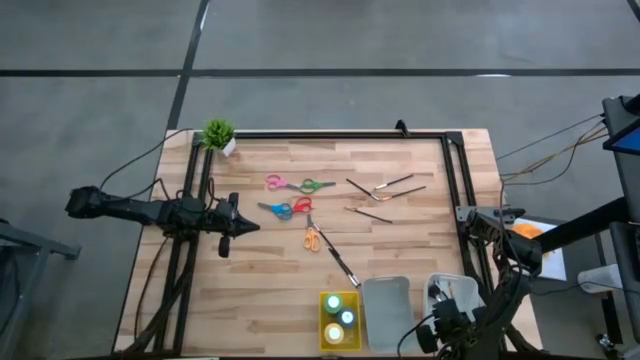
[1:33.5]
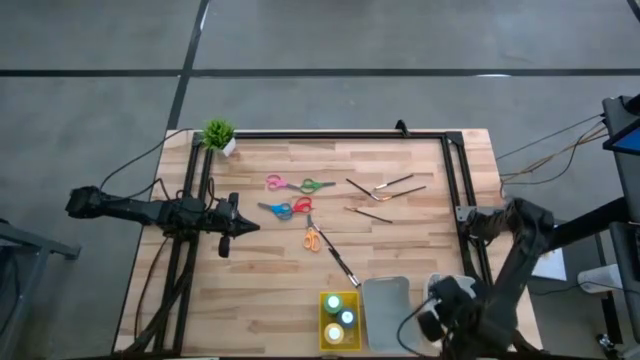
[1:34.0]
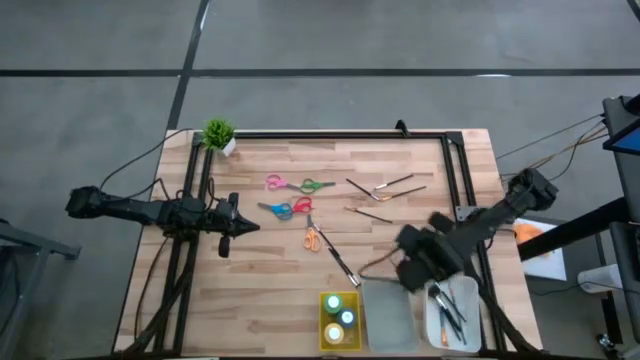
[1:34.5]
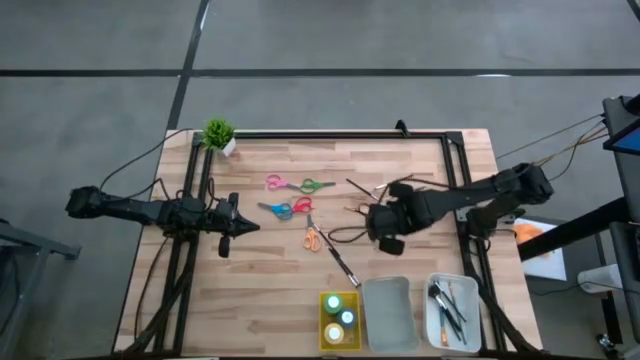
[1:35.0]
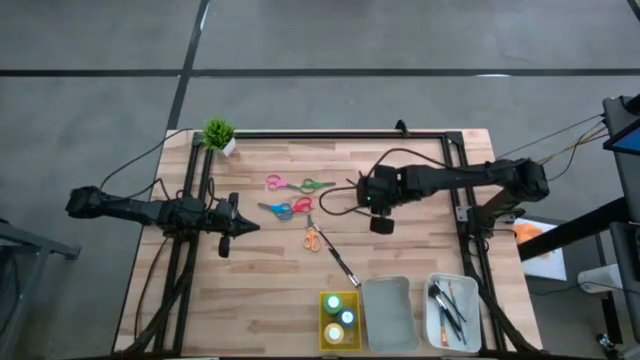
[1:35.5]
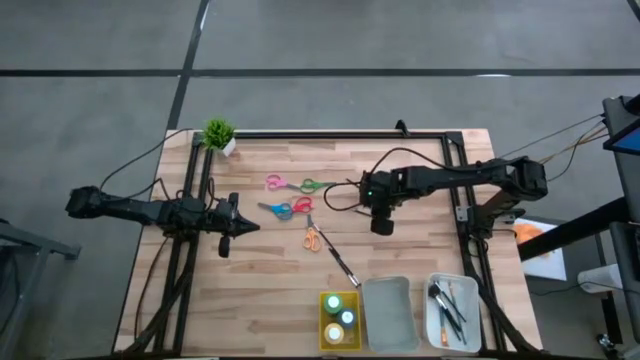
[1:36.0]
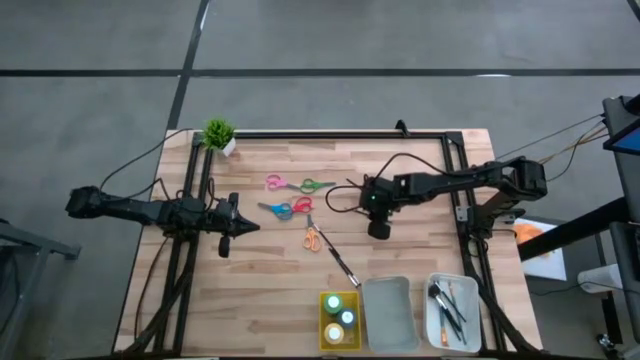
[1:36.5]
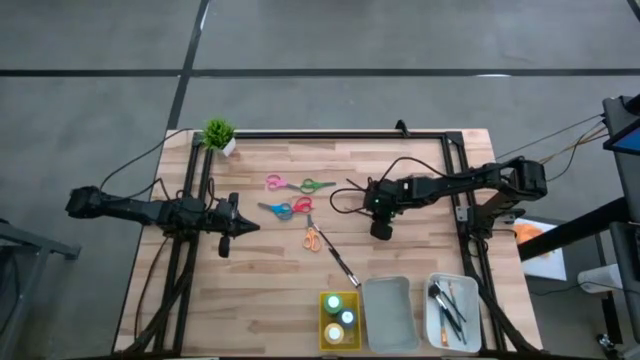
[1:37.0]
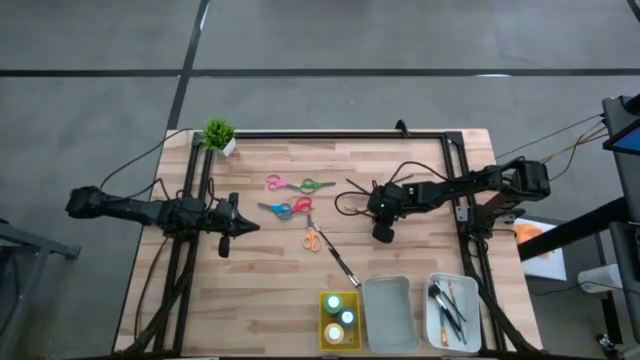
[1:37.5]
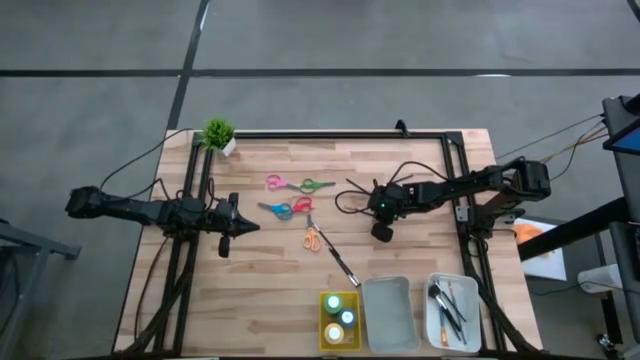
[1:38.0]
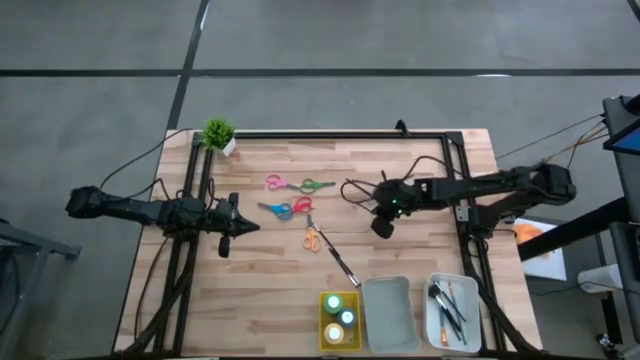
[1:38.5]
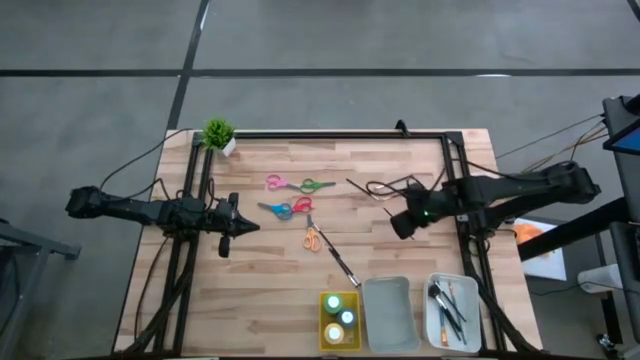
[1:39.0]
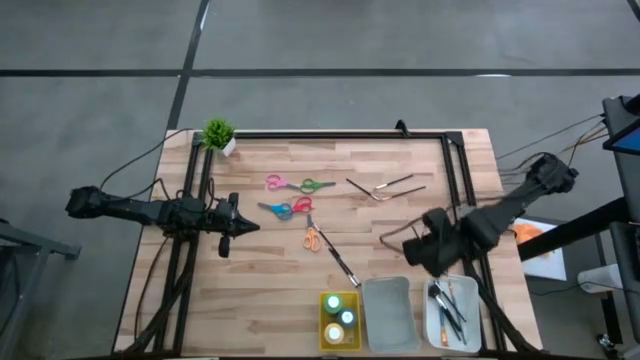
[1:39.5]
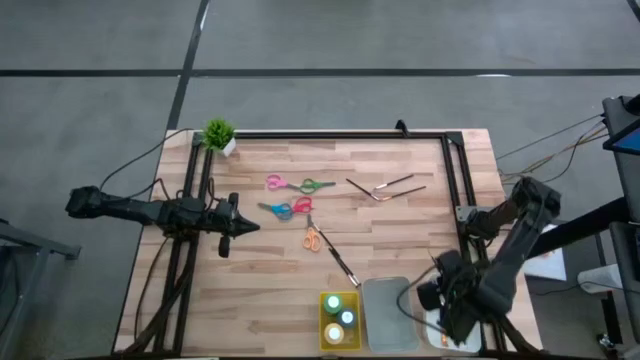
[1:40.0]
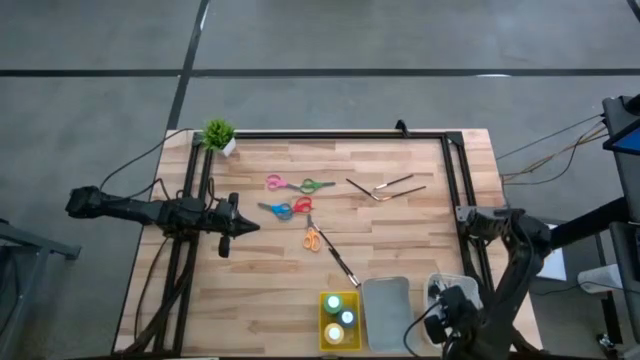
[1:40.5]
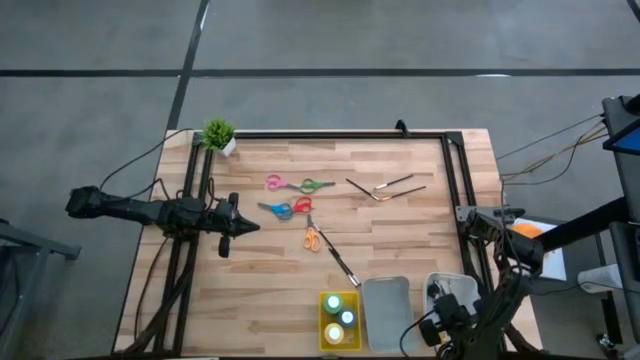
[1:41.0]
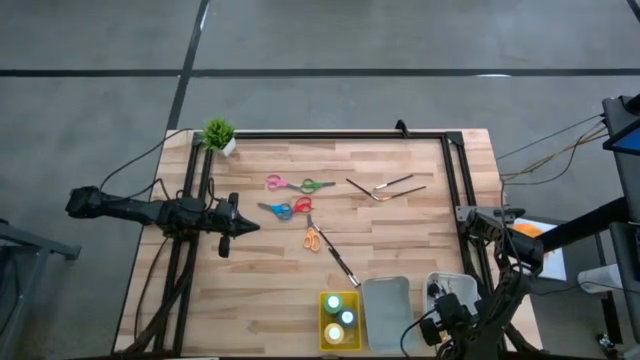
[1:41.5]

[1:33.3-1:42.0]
Task: Pick & Place Paint Supplies
Put the gold paint brush into the white bin

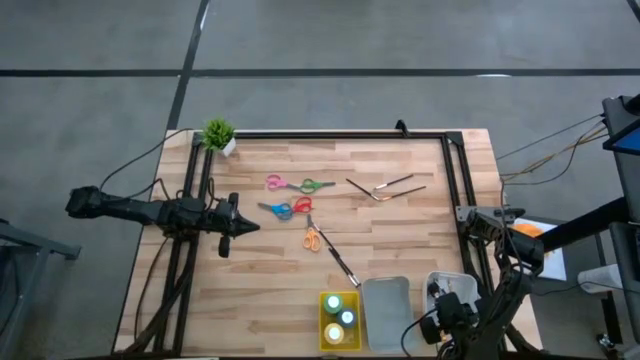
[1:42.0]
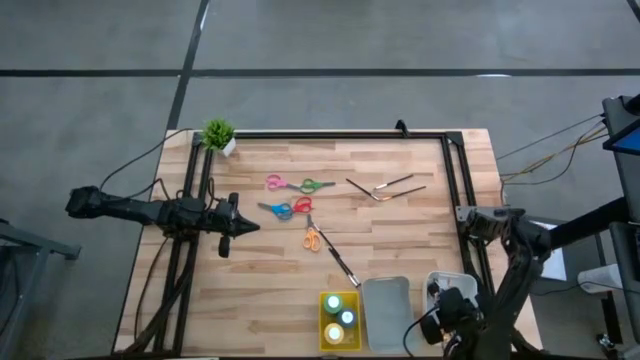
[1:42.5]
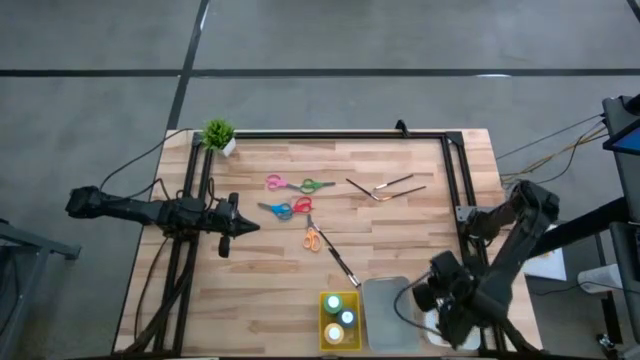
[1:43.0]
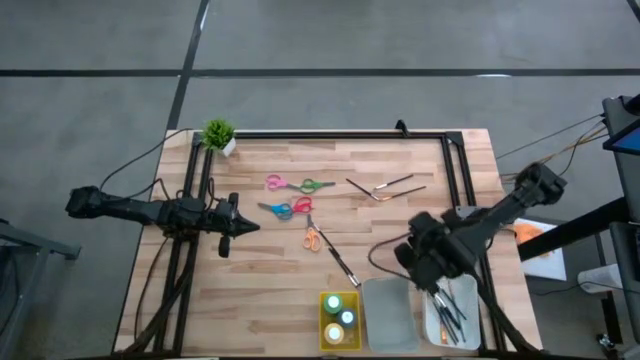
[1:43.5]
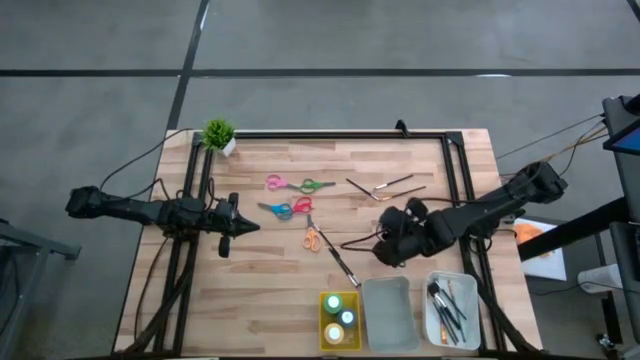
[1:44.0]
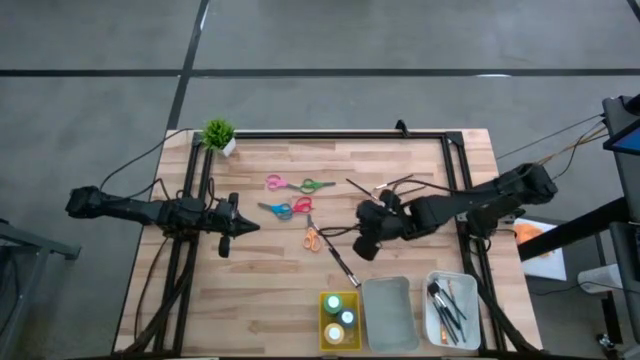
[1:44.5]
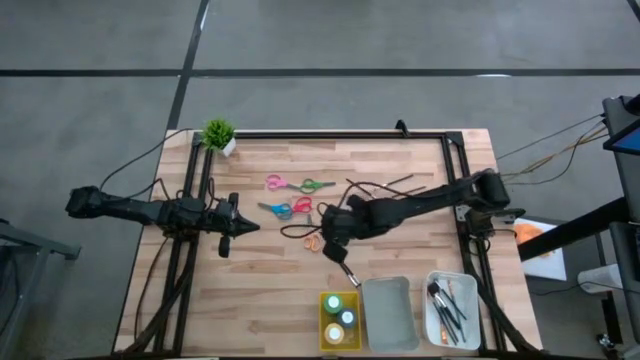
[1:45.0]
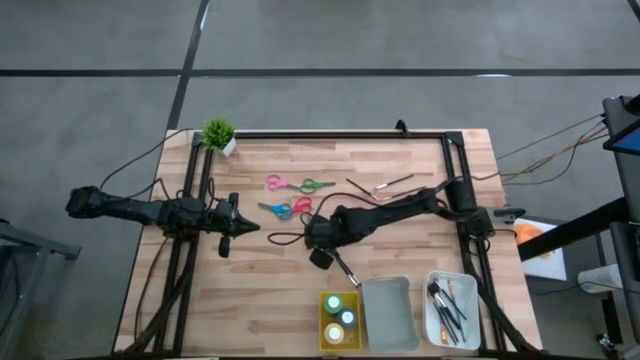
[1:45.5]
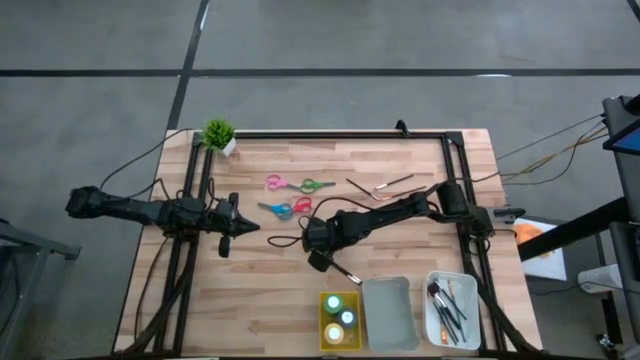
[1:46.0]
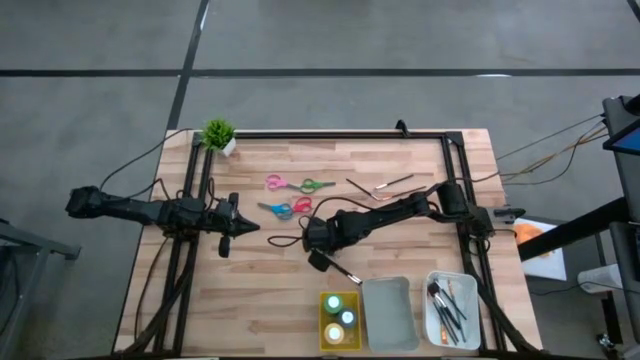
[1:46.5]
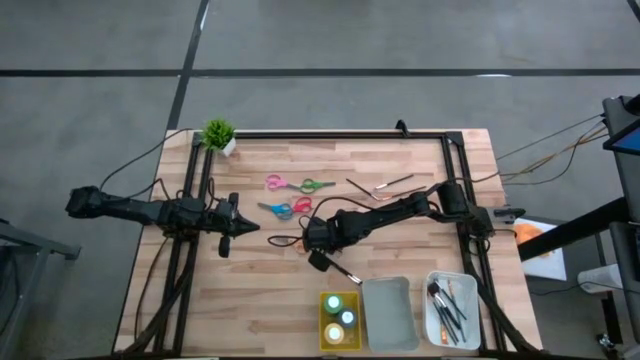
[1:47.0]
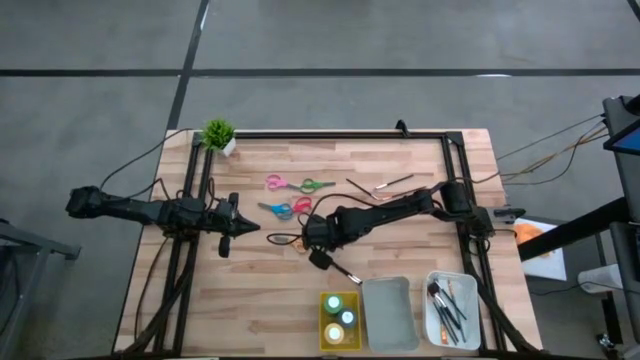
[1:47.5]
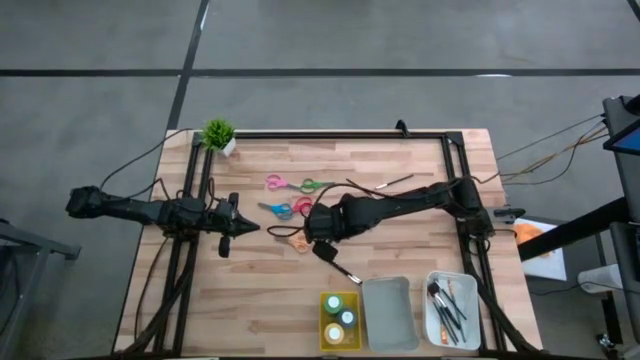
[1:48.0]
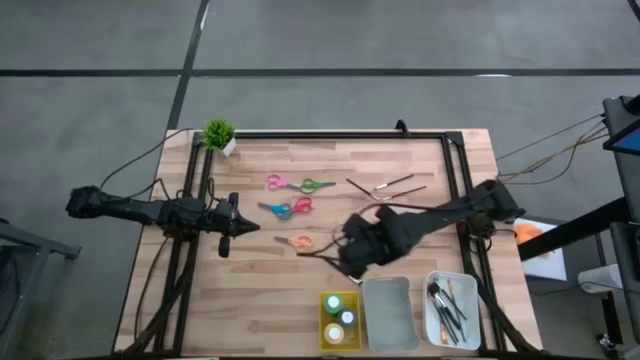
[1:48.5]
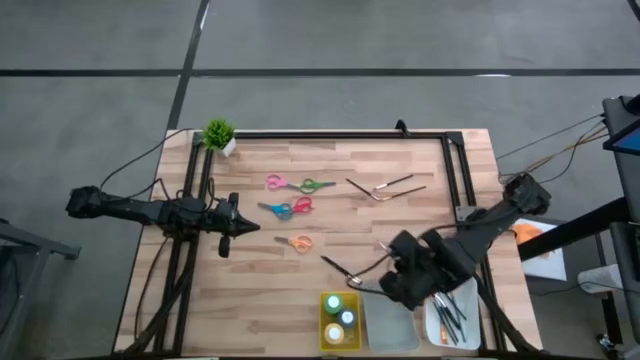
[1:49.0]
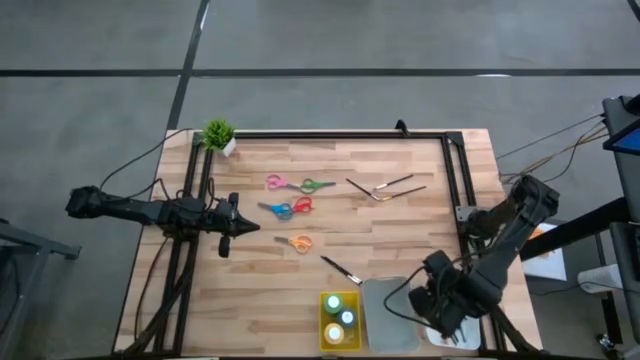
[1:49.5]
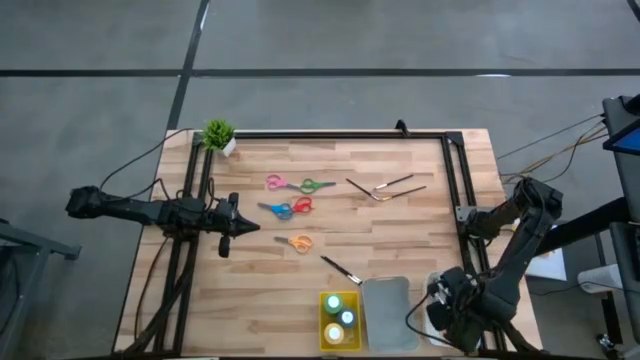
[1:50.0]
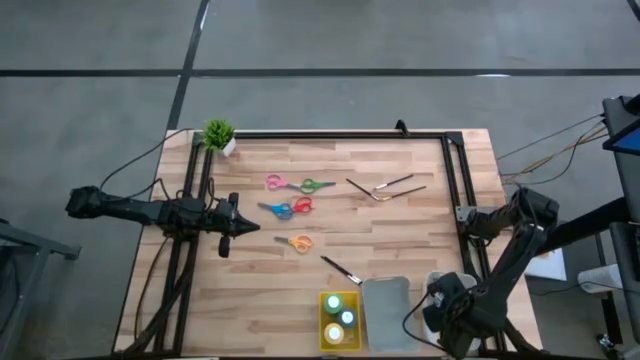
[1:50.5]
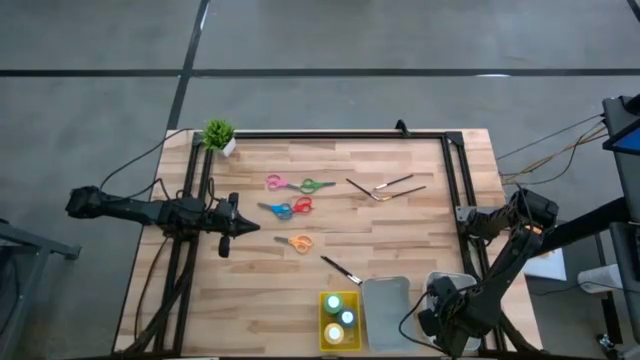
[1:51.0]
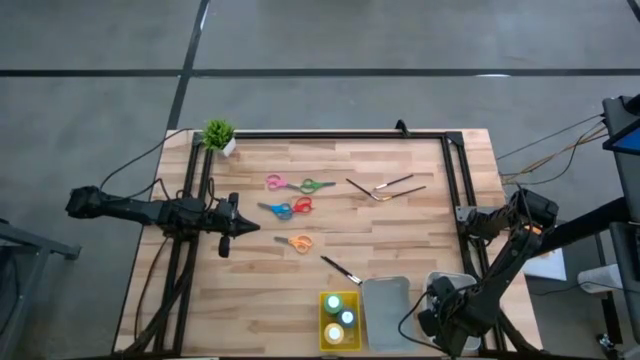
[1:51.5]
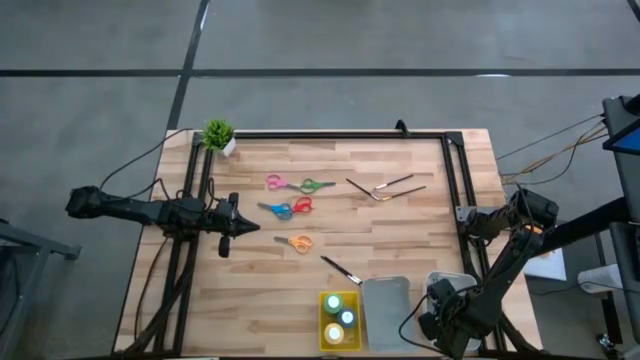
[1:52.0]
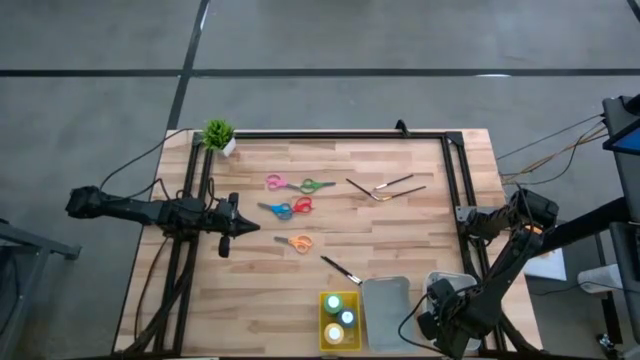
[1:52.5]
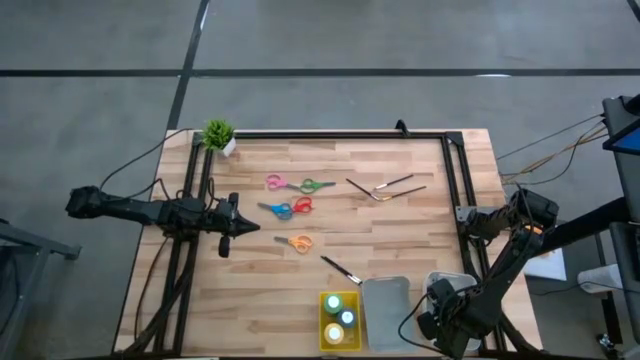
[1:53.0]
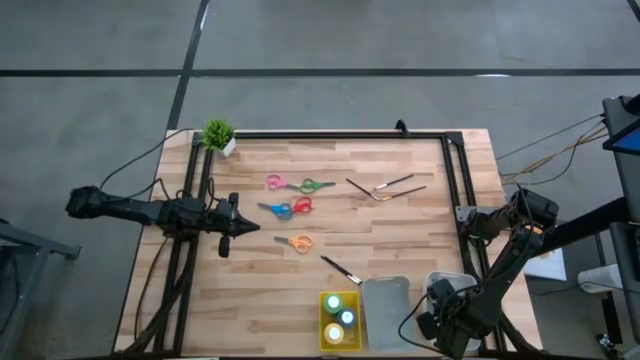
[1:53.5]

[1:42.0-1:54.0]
Put the silver brush into the white bin
